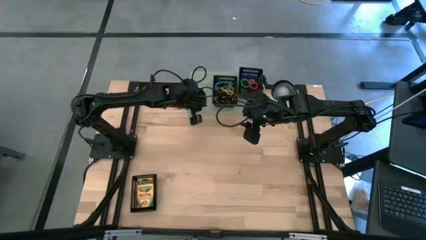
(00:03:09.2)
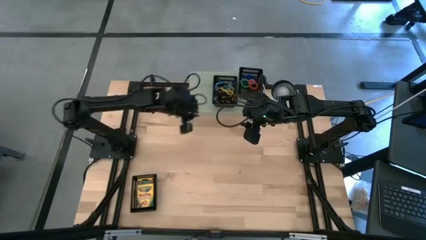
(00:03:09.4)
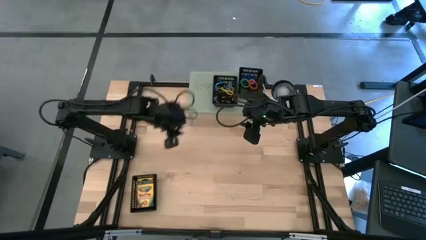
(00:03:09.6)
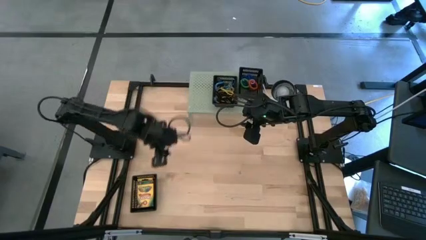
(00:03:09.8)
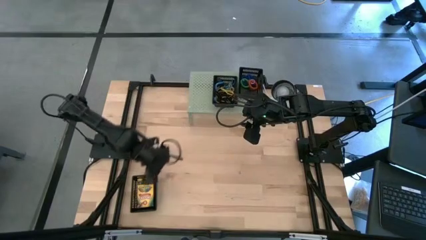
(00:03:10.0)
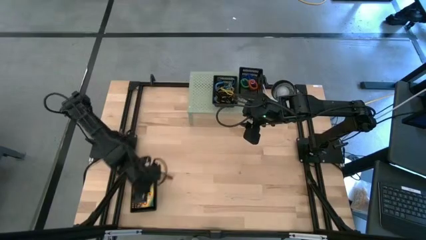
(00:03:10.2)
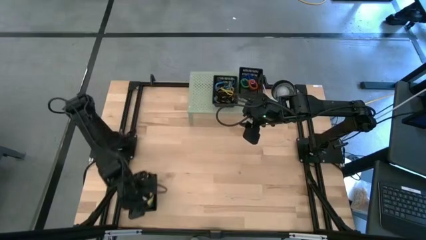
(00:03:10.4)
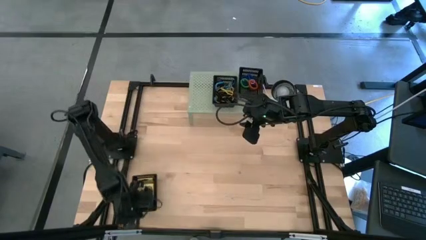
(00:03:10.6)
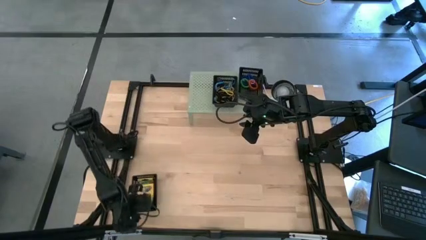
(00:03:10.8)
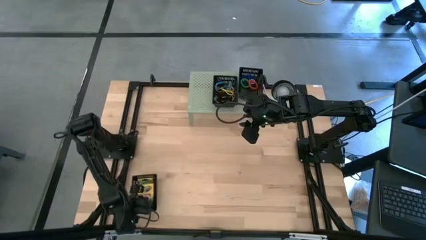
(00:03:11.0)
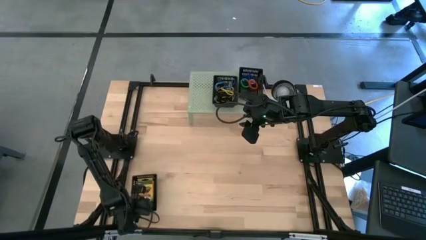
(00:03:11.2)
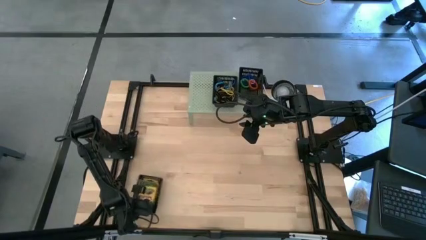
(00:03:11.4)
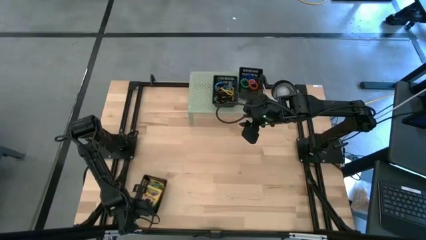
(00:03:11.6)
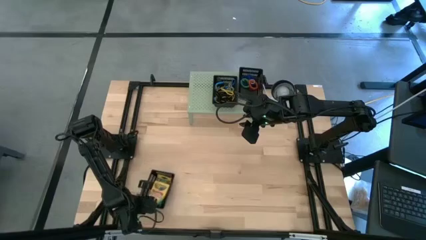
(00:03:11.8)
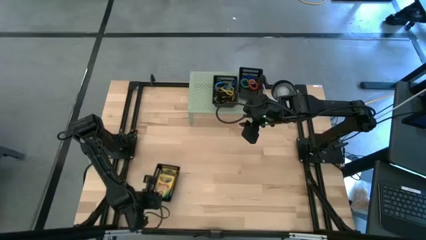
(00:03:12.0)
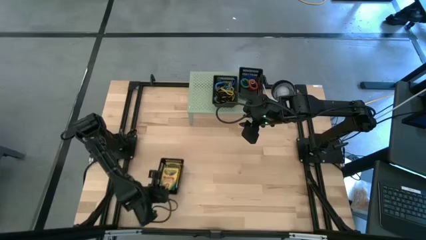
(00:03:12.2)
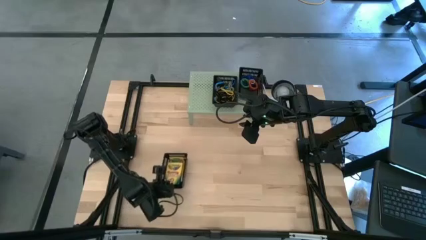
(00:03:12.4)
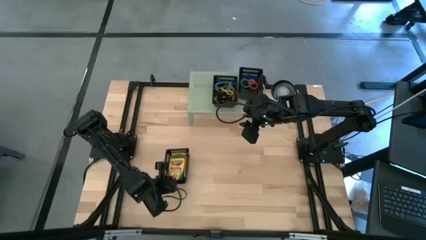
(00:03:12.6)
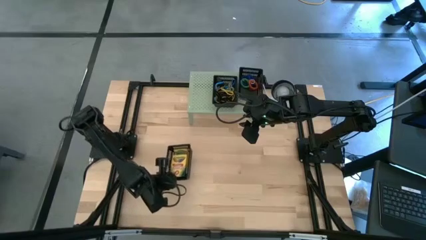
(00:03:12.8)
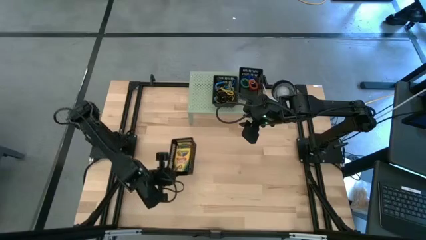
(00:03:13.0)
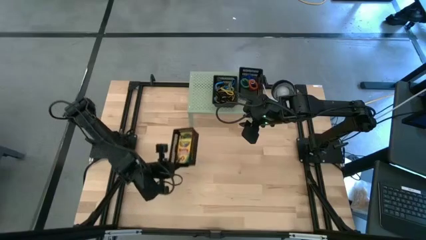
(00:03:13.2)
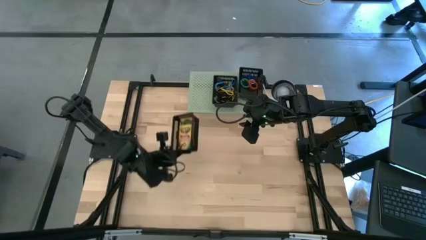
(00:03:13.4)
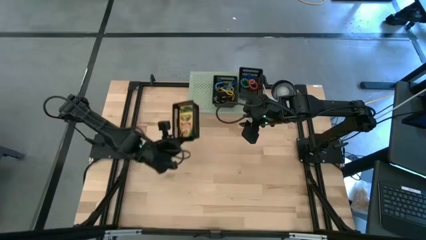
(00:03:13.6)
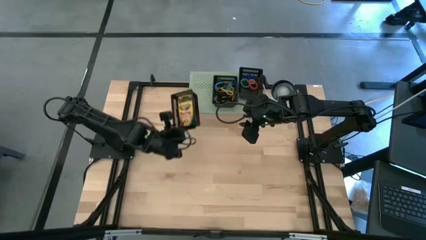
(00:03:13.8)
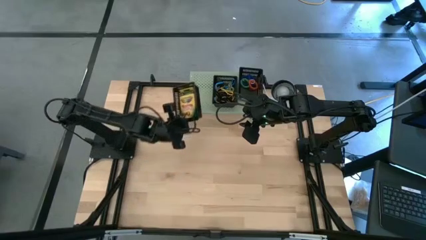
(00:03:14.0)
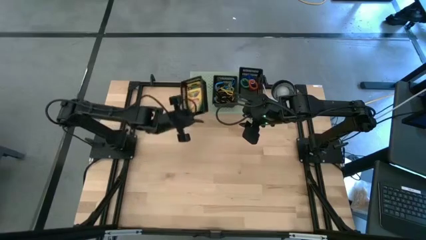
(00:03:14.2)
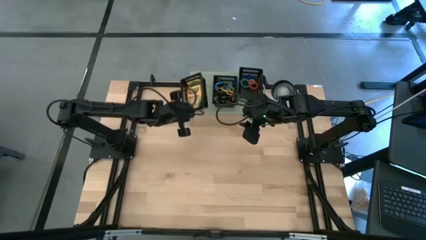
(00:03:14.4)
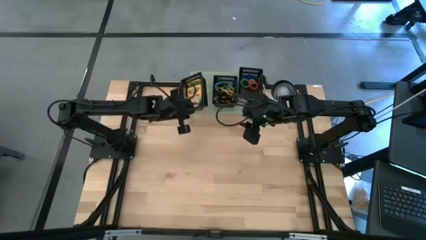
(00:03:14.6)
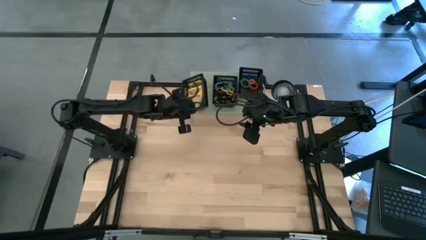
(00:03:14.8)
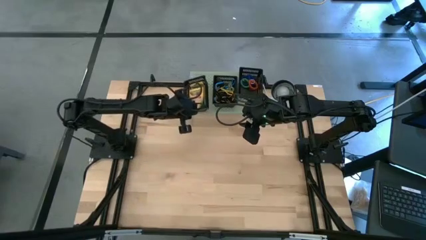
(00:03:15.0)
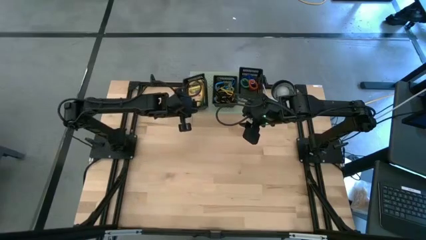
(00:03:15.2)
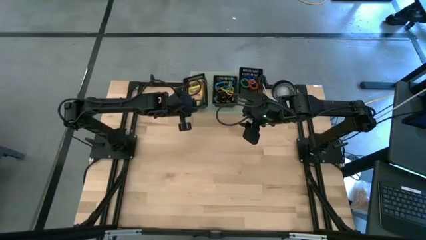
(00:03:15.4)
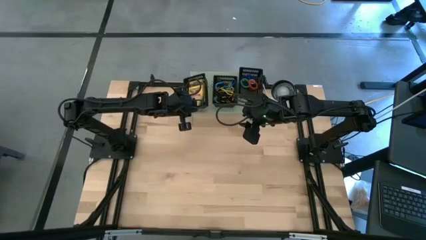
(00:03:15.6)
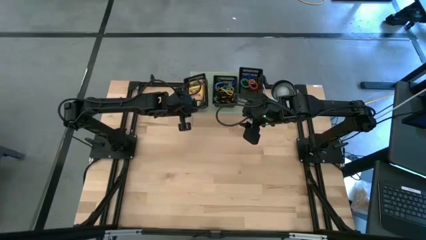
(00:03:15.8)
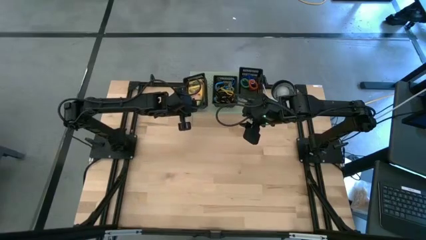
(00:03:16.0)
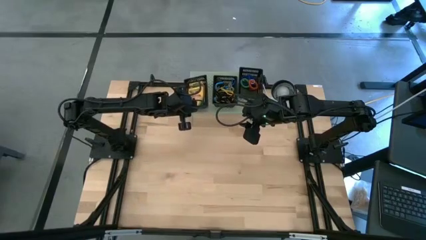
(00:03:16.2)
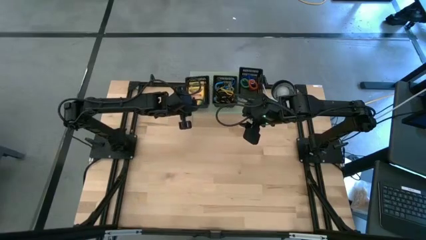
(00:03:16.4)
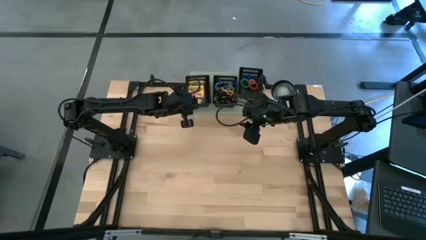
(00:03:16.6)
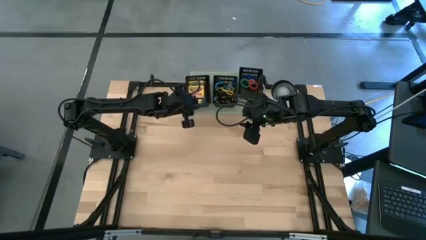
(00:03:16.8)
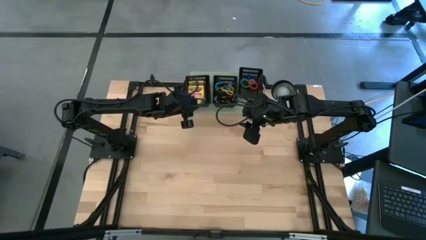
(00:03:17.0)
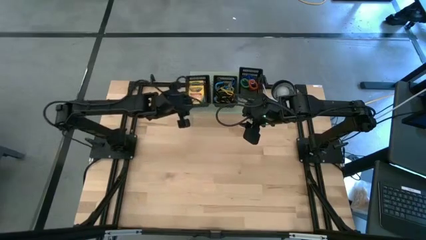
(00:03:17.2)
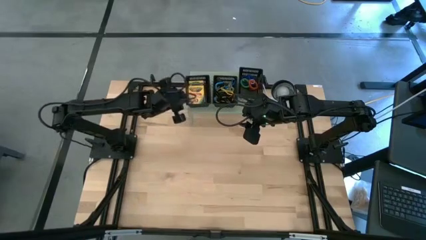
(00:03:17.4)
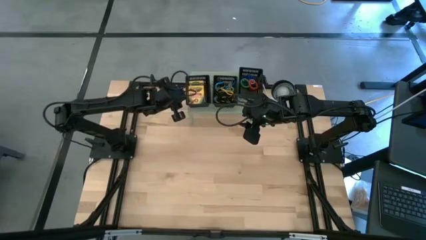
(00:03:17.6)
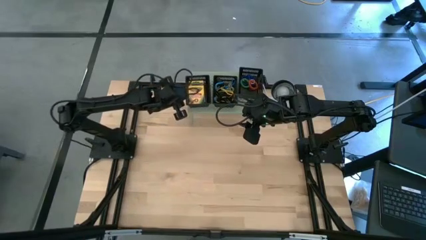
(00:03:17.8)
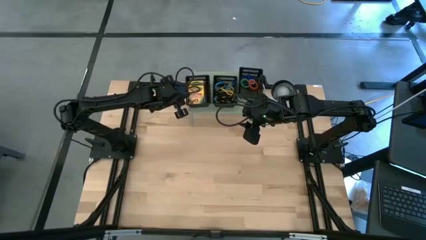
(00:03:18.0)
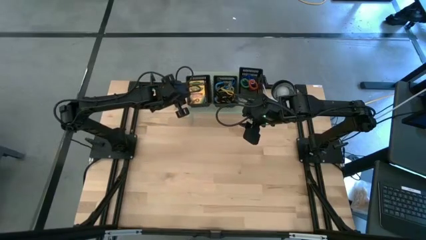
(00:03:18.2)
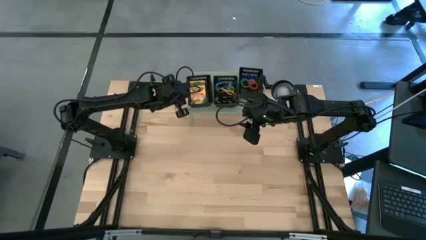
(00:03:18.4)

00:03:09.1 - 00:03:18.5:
Task: Pick & Place Office Desk Supplies
Put the black bin on the shelf

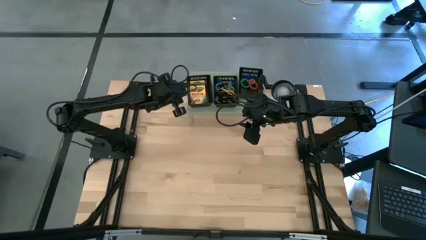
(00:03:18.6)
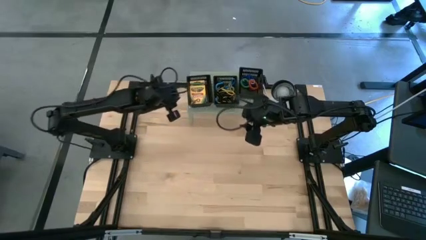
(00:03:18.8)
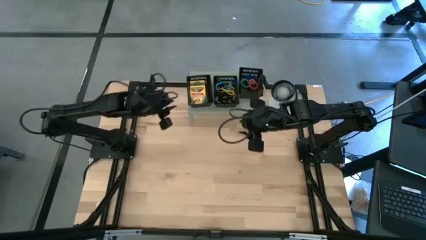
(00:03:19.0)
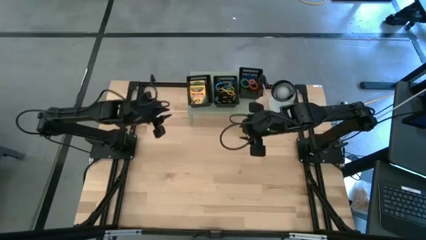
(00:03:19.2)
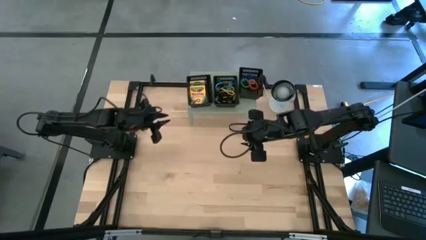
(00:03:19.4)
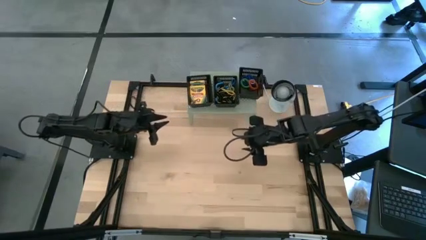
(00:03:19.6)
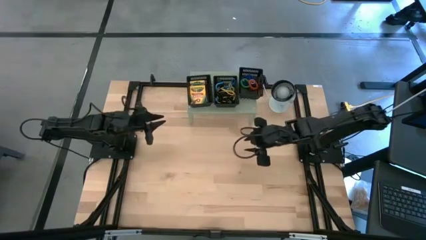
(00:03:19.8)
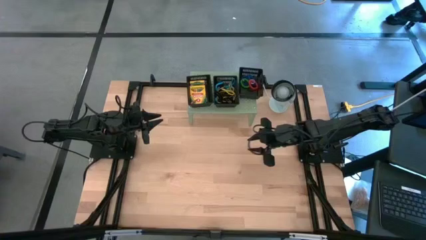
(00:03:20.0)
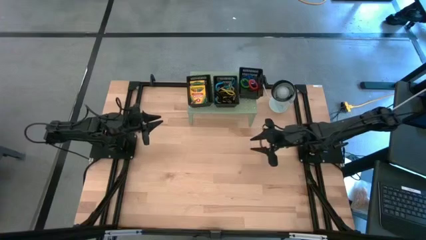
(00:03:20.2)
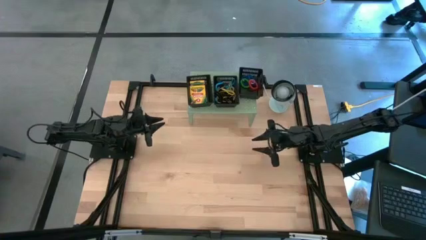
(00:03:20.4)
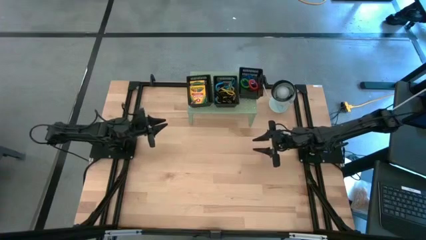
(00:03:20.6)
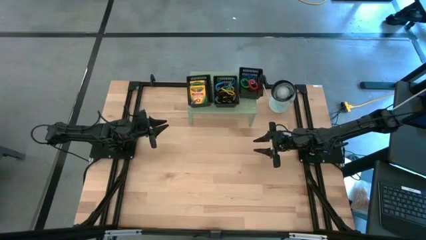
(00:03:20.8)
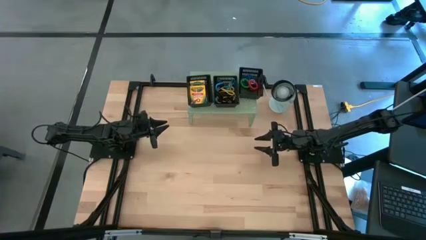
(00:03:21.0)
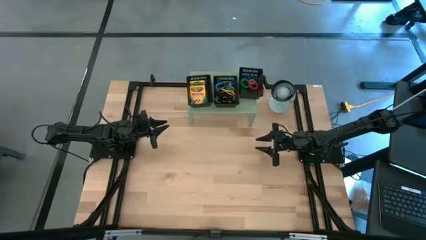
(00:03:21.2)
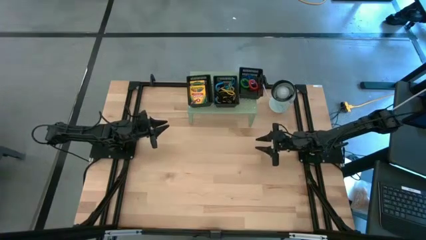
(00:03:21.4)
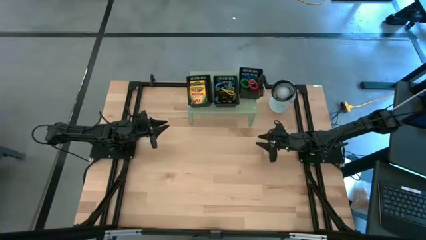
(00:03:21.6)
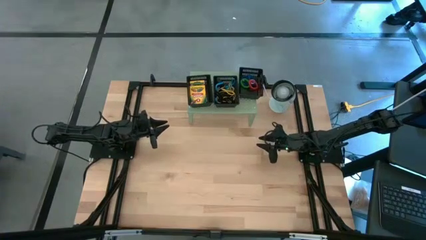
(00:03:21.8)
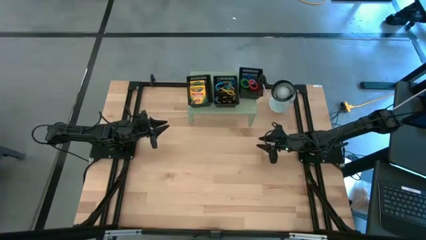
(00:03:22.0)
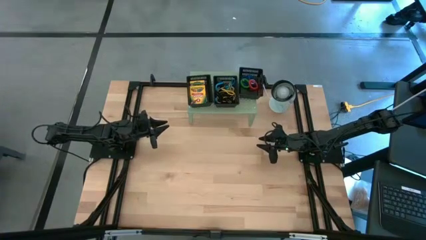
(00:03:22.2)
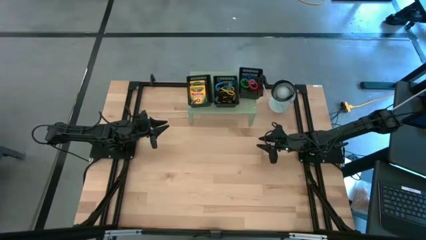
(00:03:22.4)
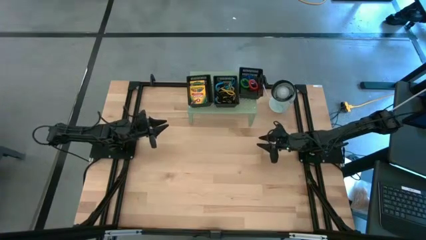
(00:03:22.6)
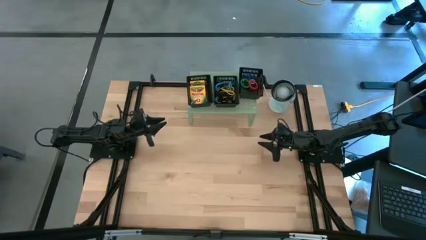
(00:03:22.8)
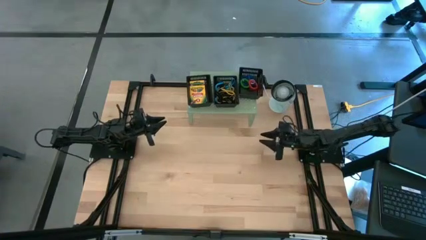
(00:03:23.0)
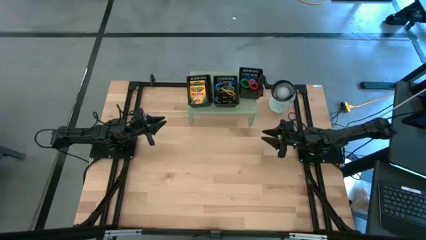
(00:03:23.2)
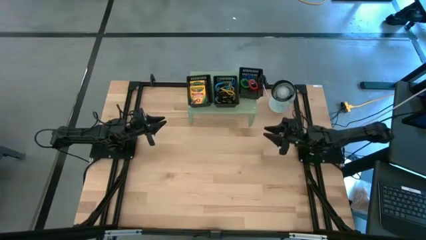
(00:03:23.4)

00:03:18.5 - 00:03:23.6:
Return to Home Position
